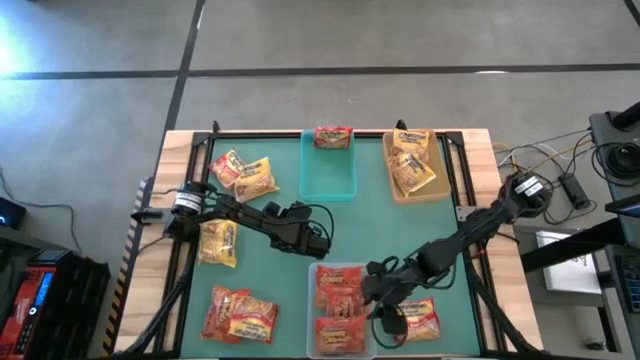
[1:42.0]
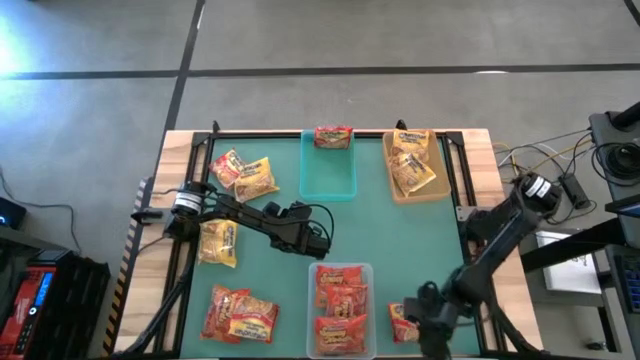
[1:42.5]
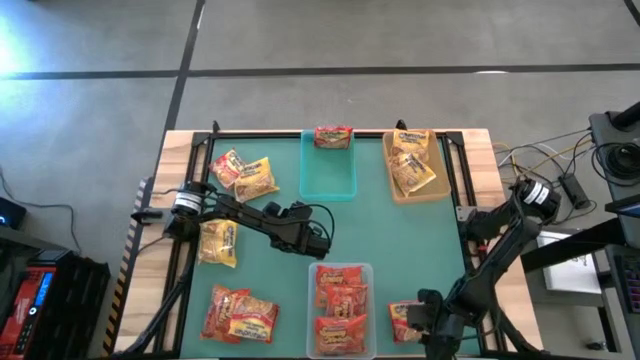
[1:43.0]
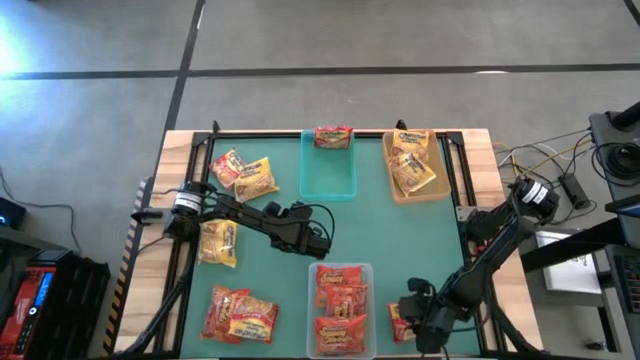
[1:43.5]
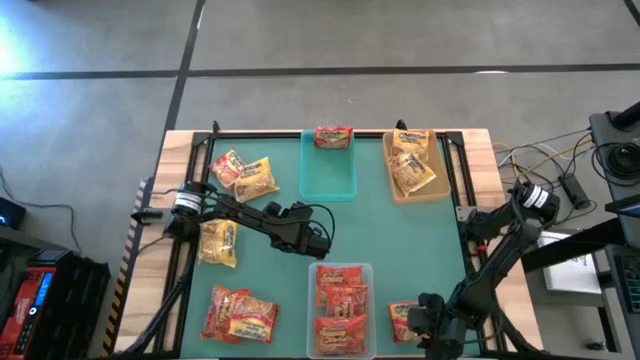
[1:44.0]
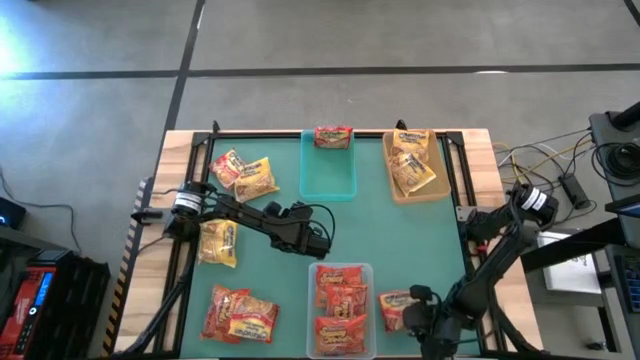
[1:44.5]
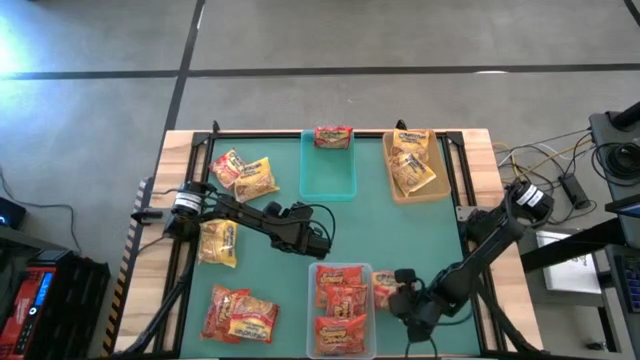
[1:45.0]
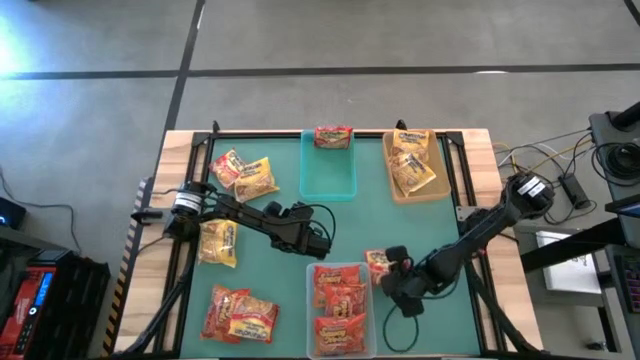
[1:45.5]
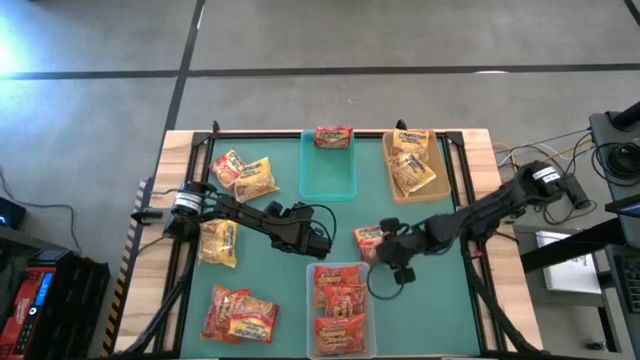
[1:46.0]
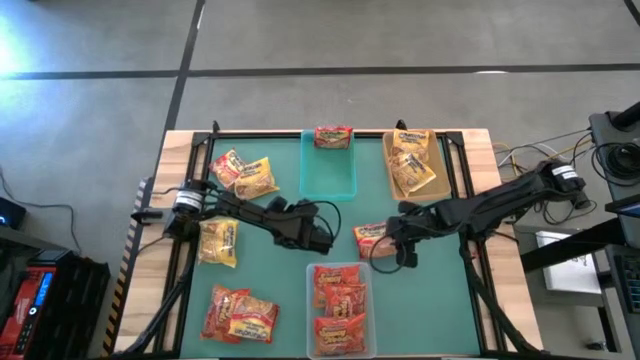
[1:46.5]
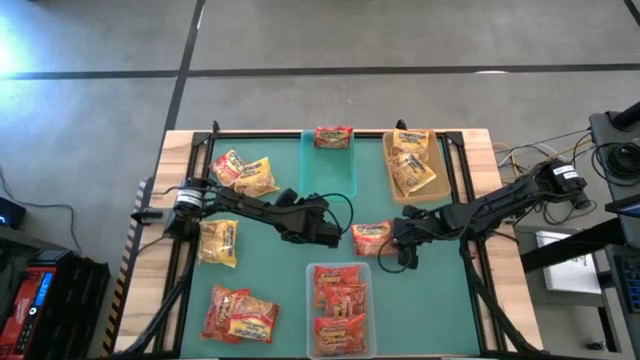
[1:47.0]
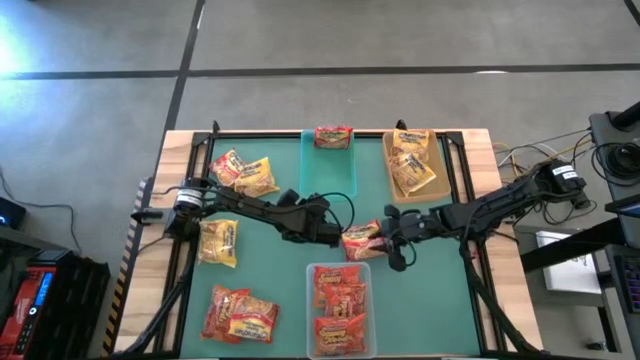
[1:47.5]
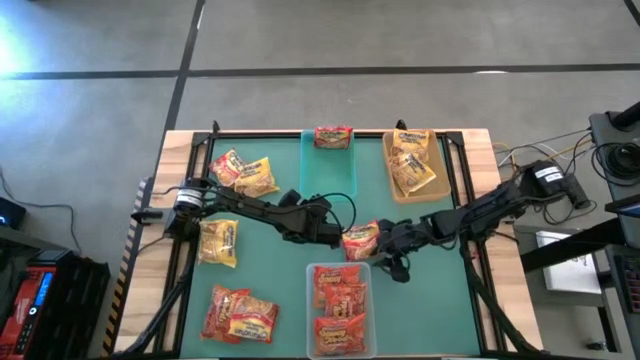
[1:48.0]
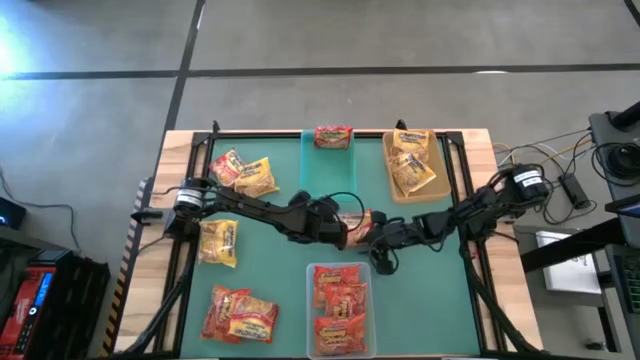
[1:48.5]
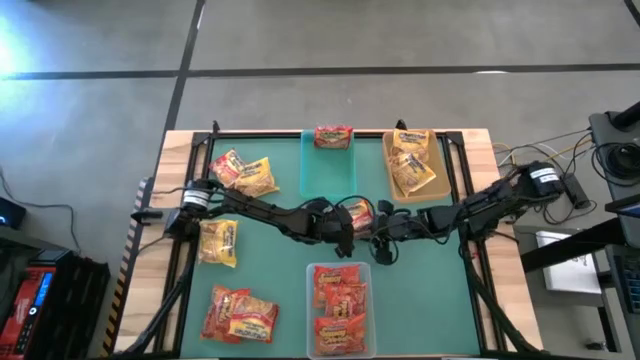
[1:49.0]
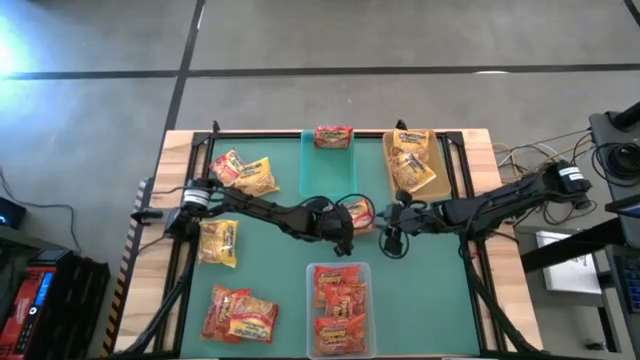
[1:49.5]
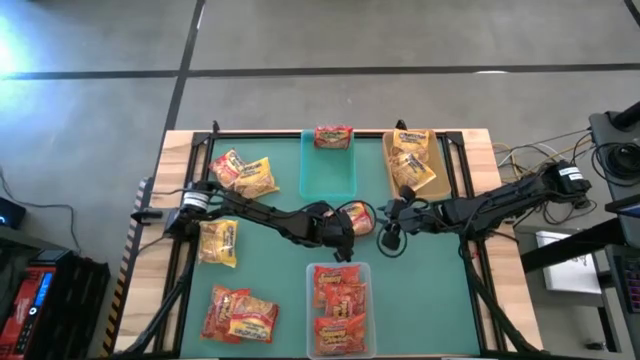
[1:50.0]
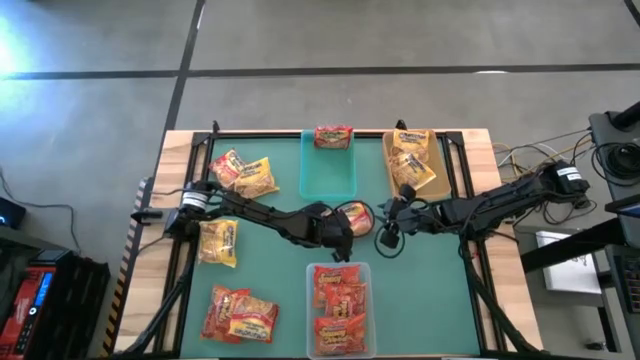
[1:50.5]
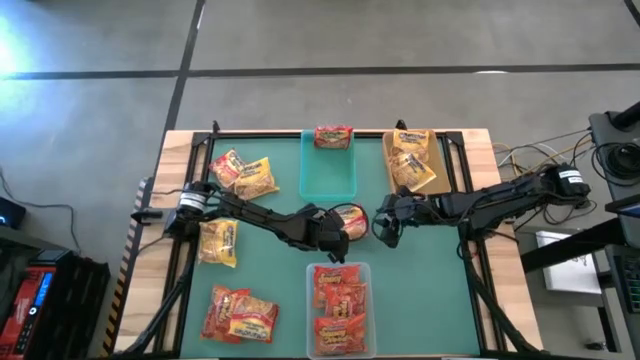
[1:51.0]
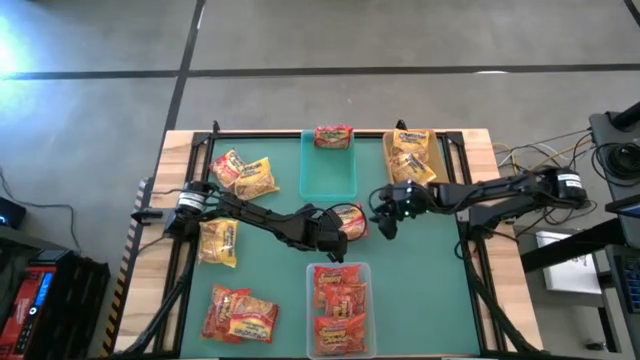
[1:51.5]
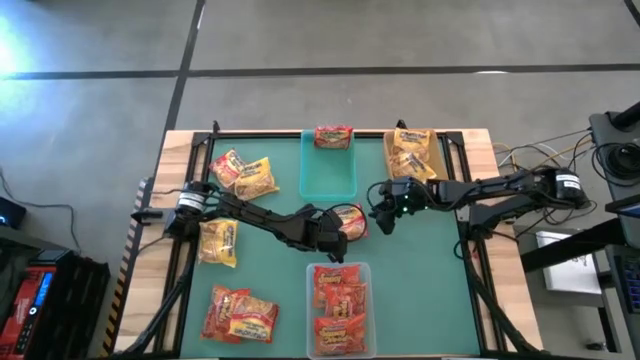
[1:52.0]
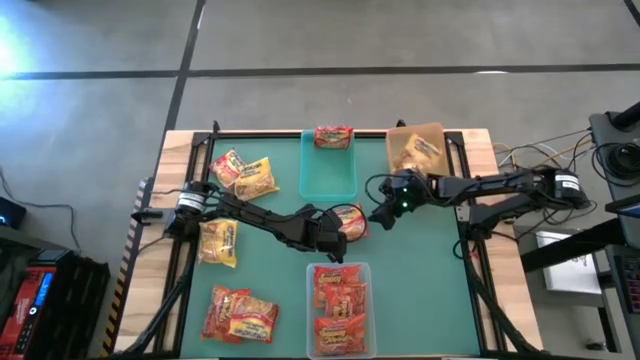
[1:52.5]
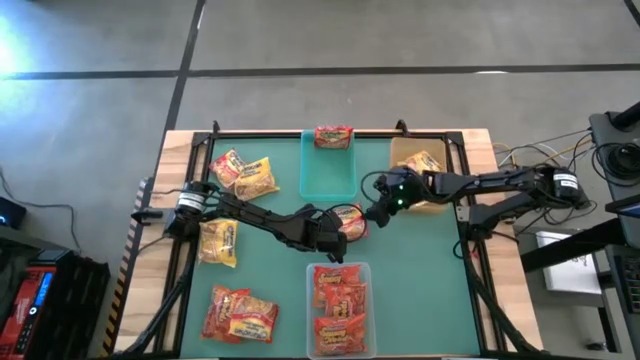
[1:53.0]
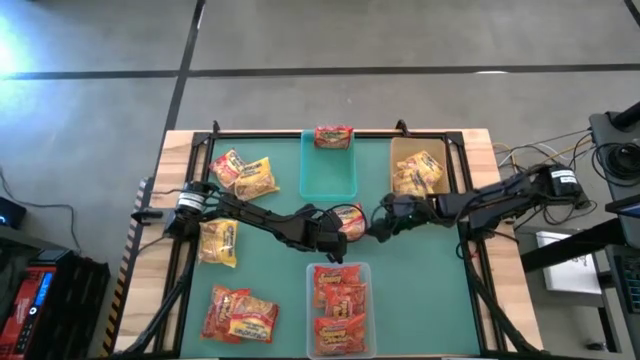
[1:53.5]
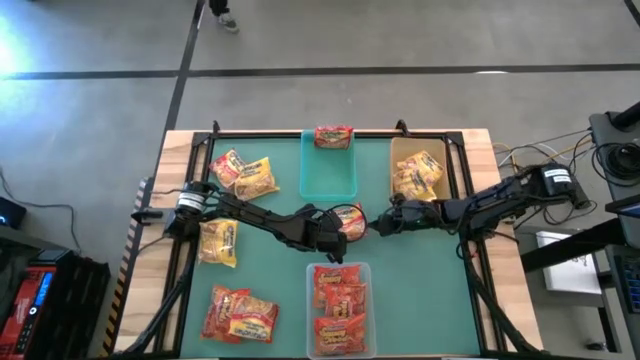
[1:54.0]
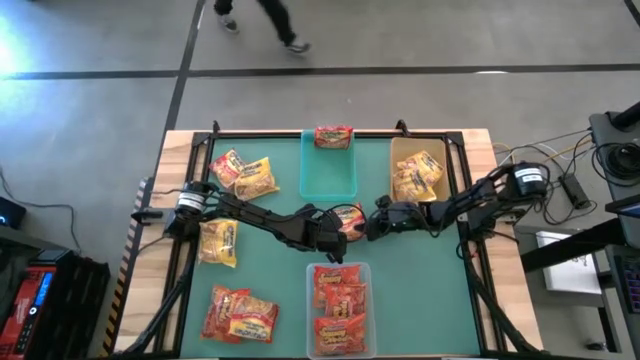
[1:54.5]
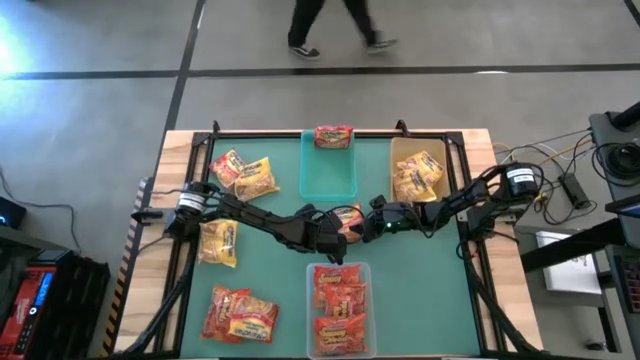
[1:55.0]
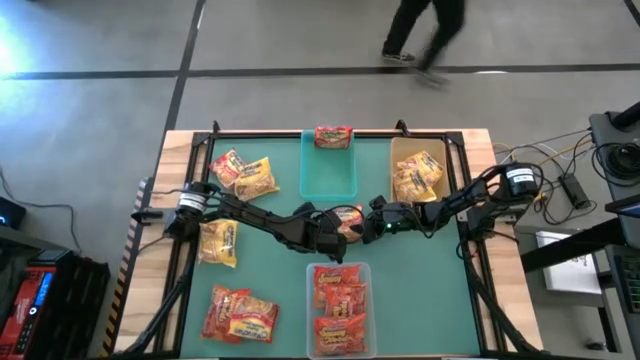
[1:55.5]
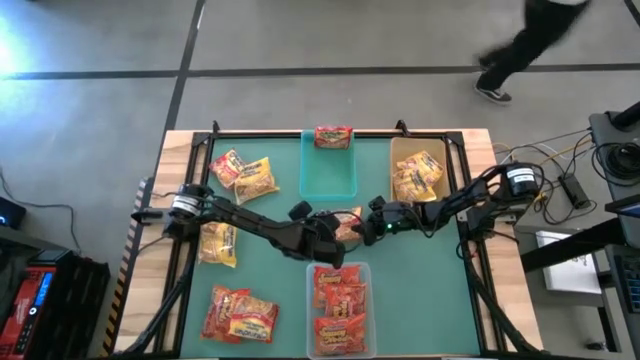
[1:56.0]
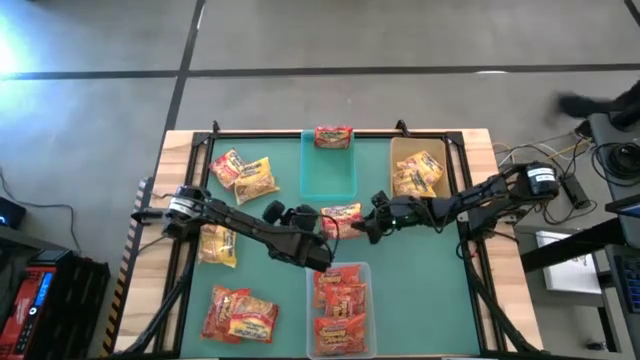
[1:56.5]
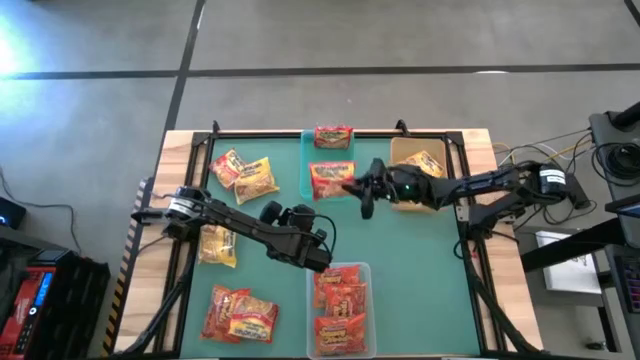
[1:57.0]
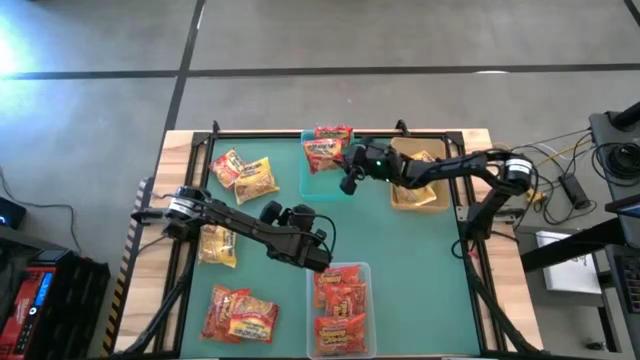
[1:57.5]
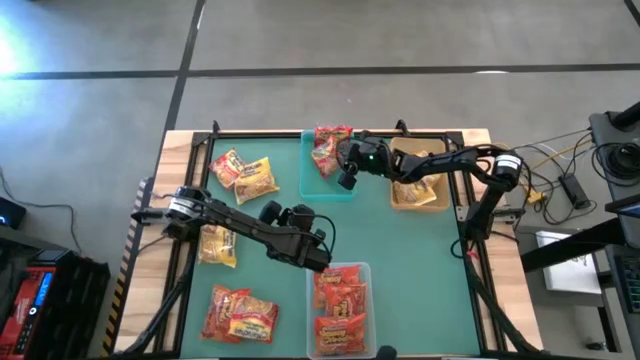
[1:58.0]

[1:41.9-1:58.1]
Task: Sort Maruchan noodles
Put the bottom right red noodle pack into the transparent green bin

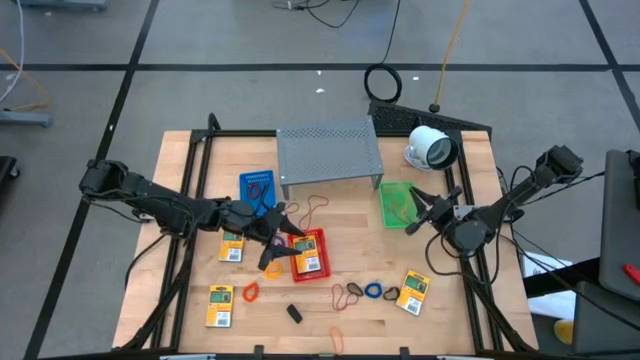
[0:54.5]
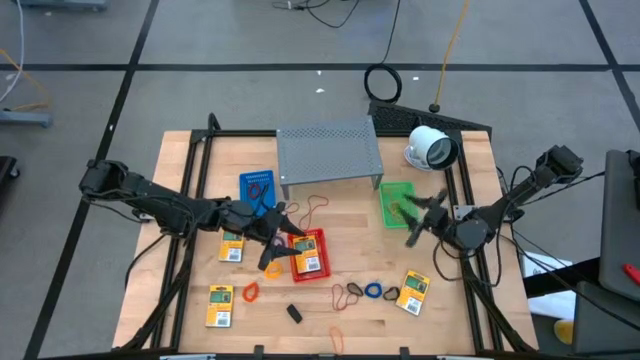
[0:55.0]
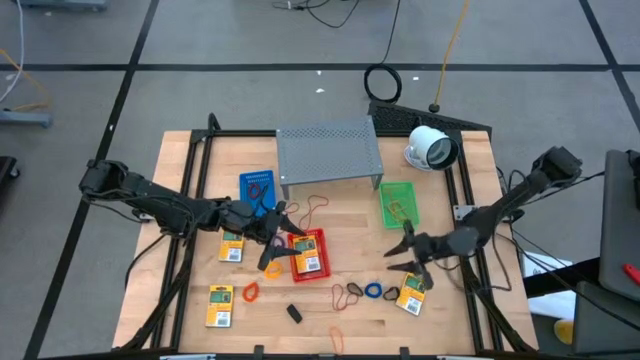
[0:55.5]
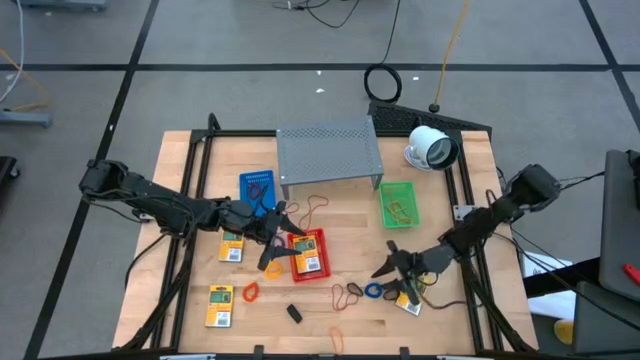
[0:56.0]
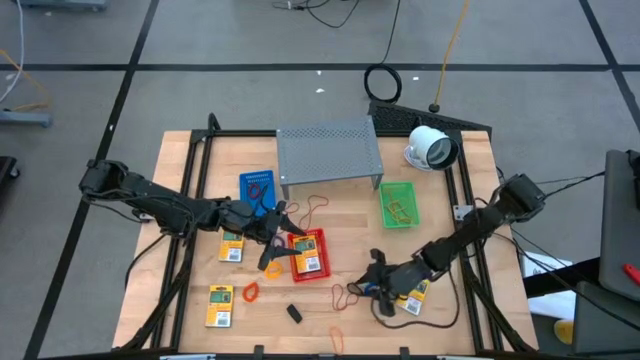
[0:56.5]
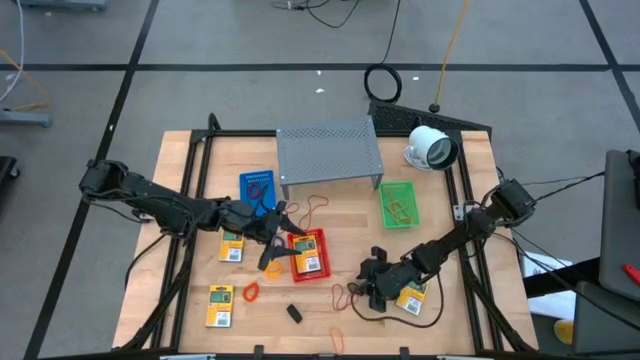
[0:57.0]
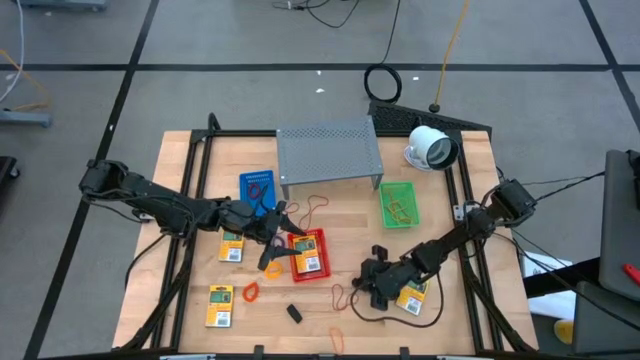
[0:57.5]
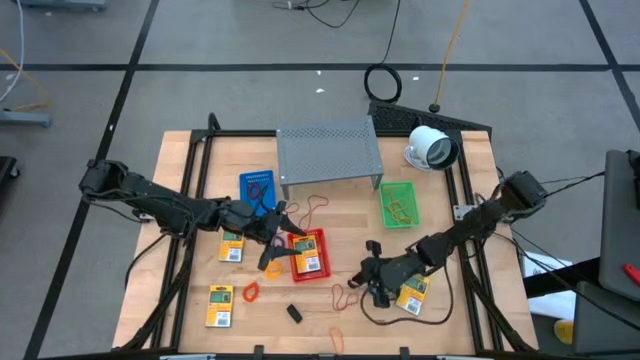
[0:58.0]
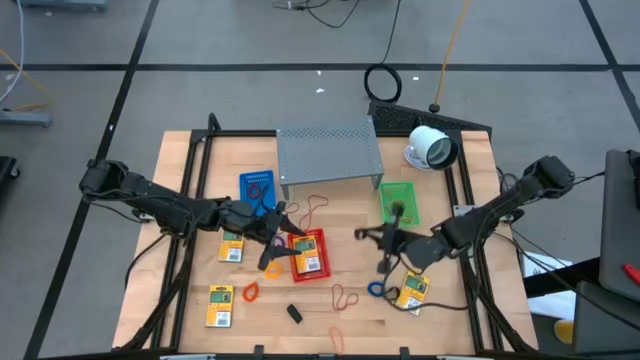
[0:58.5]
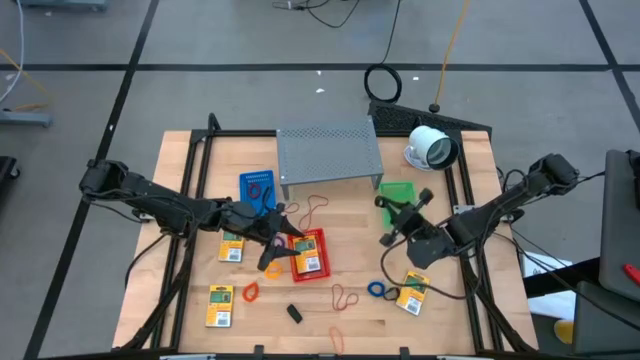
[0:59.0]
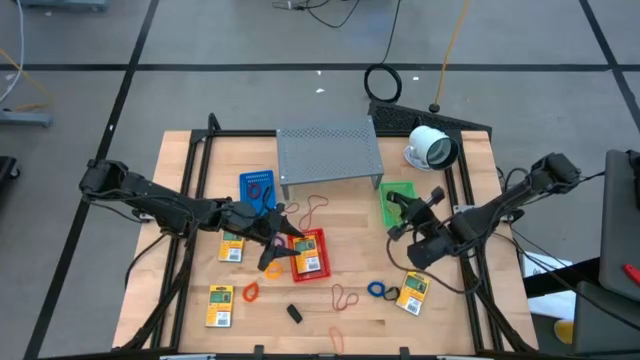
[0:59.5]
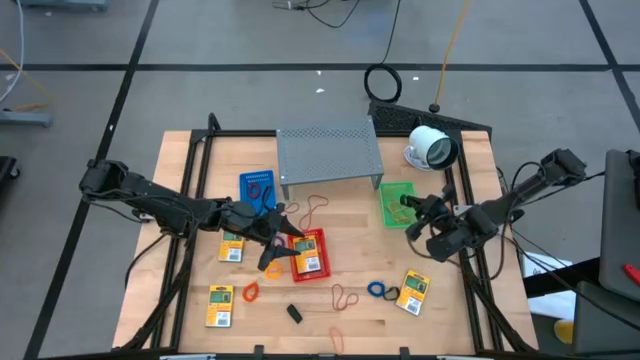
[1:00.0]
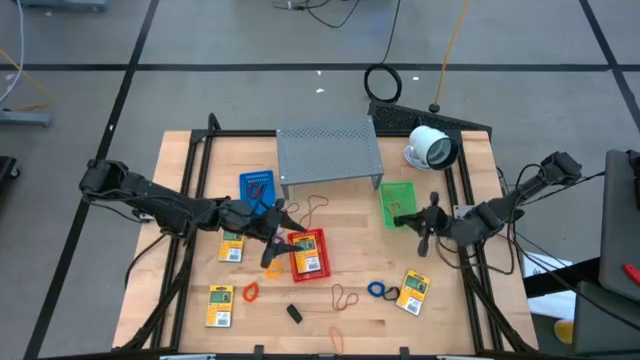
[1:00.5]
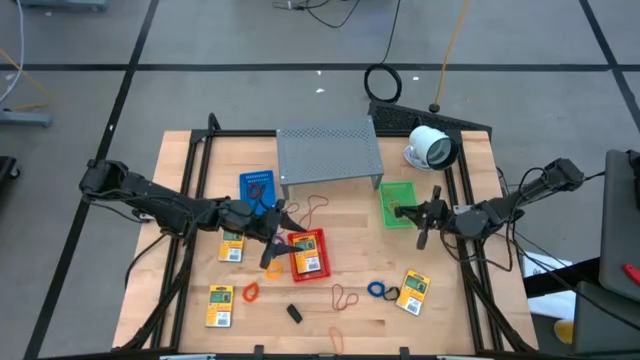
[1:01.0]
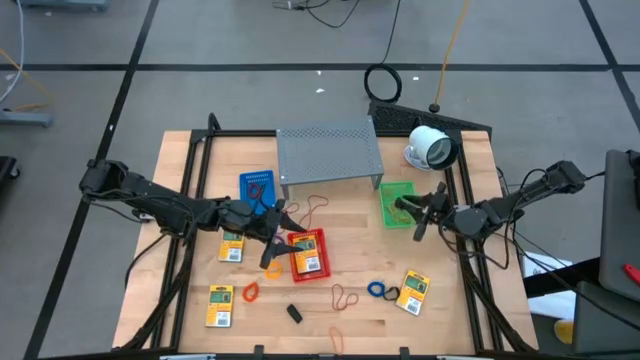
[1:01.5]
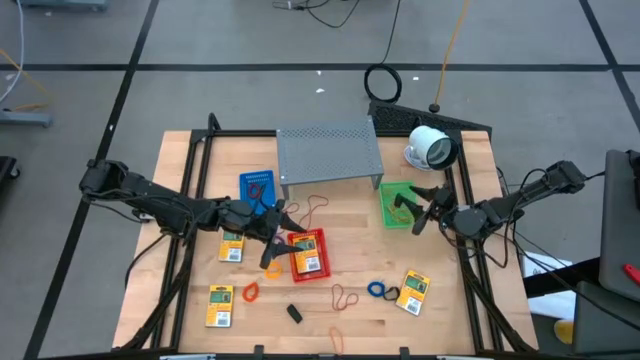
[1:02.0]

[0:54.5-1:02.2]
Task: Pick & Place Office Desk Supplies
Put the top black rubber band into the green bin
